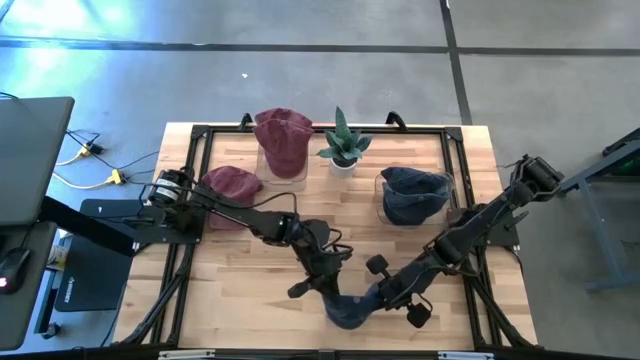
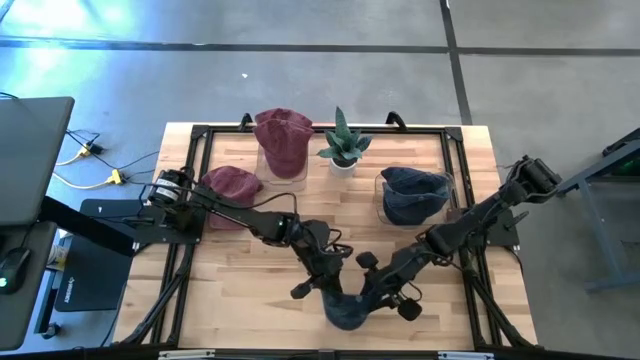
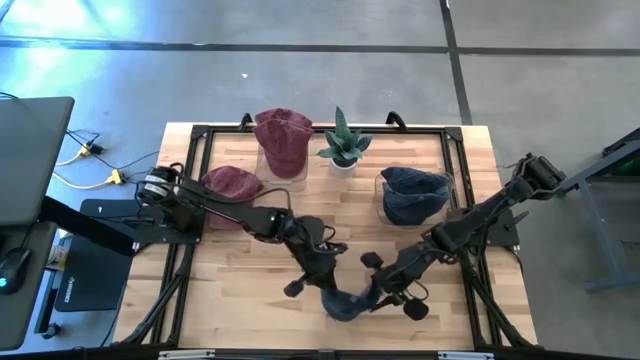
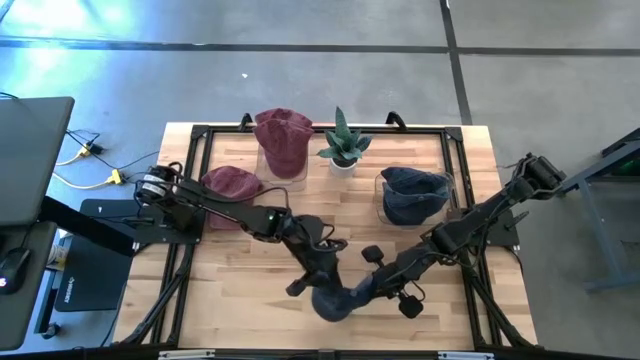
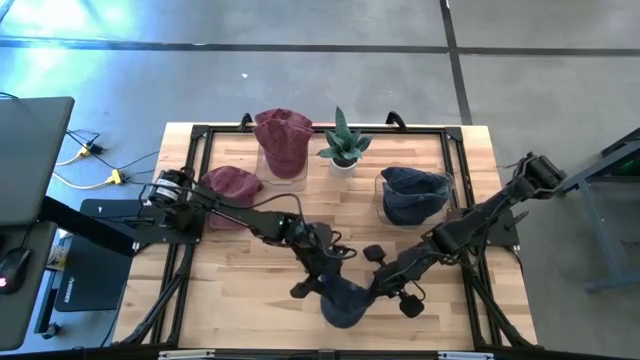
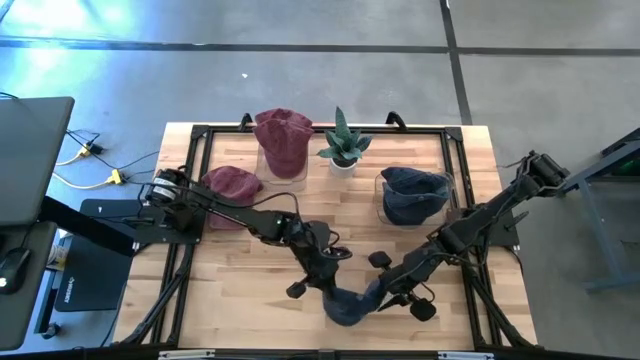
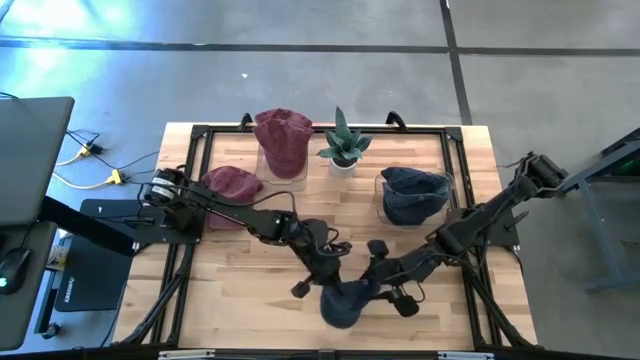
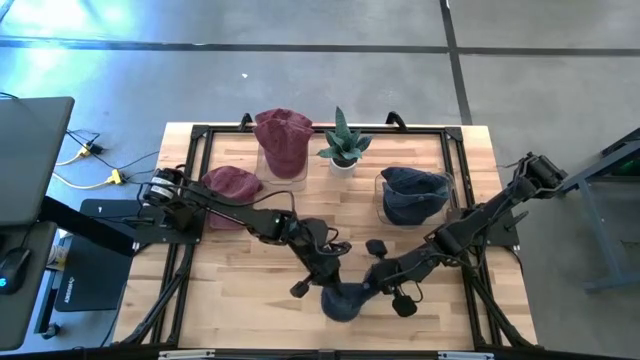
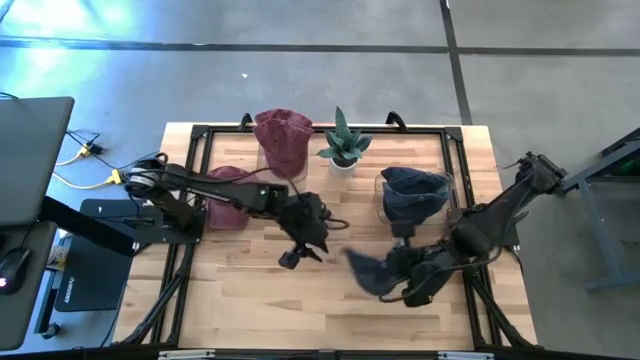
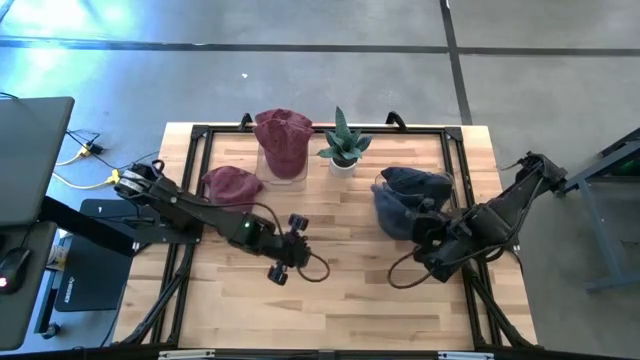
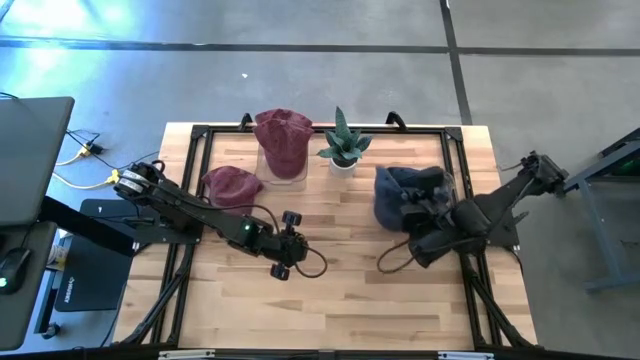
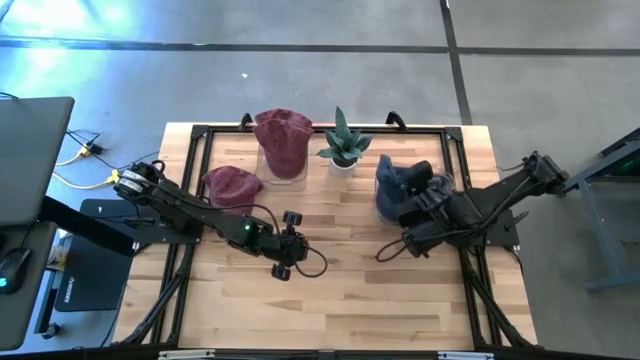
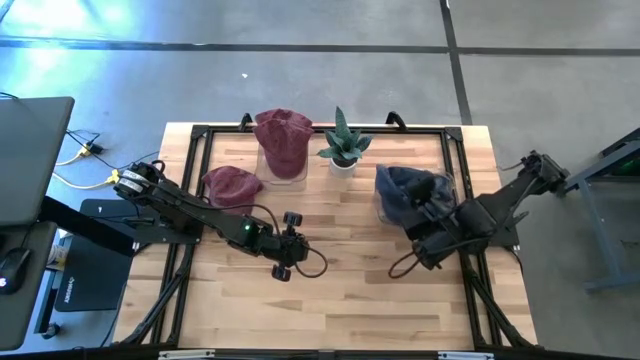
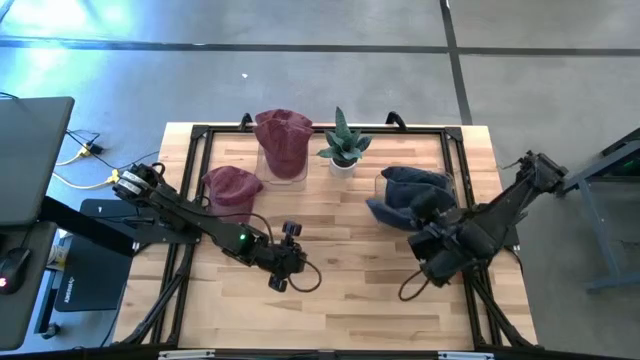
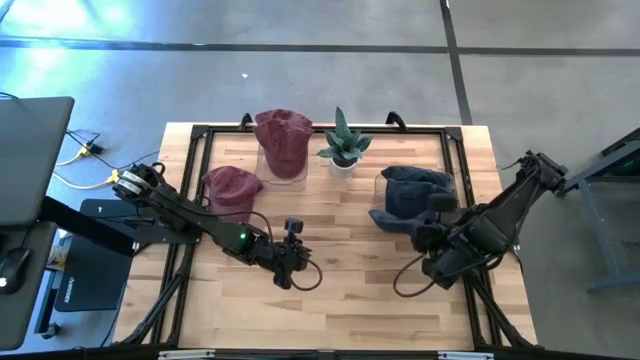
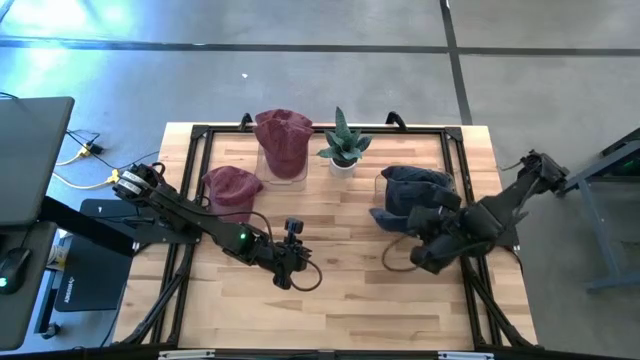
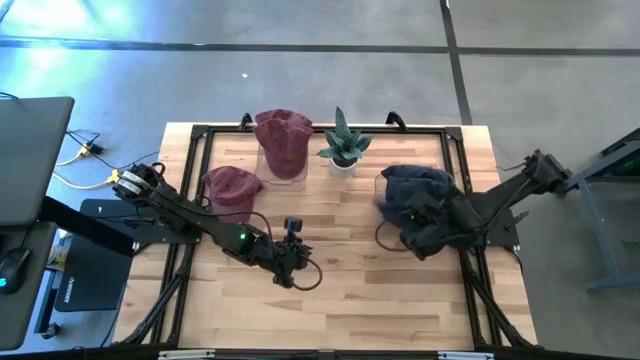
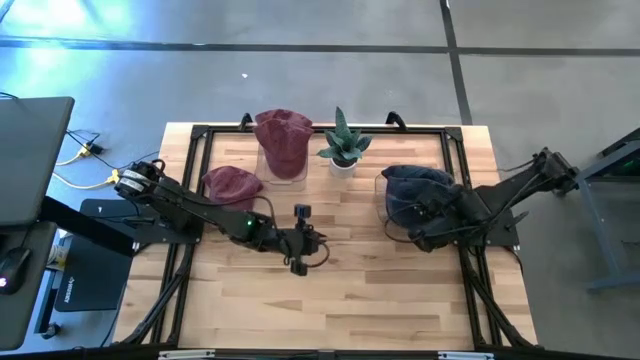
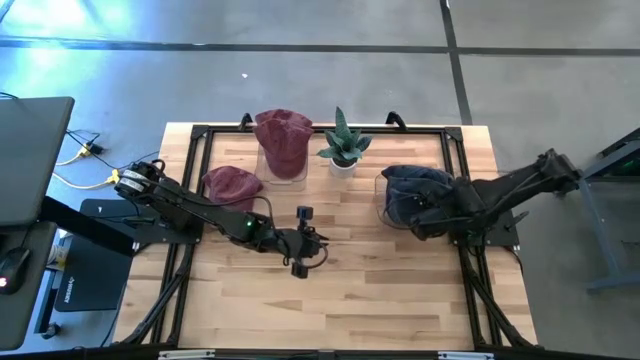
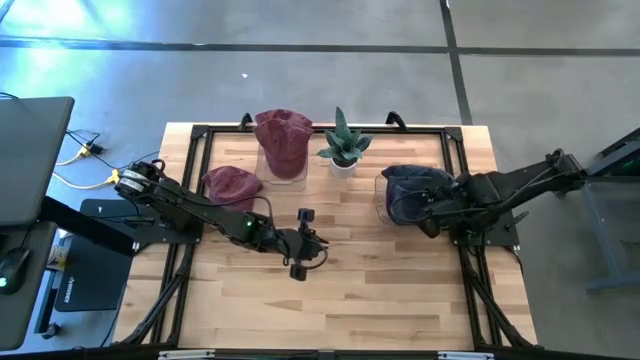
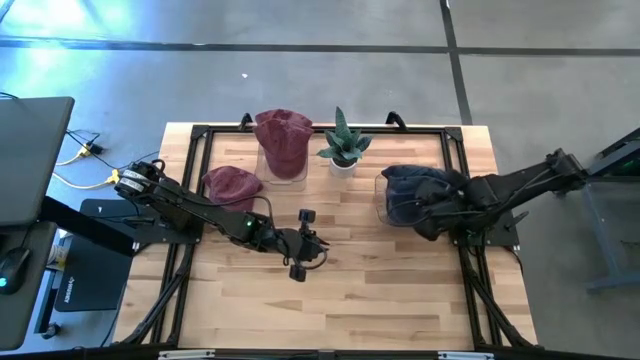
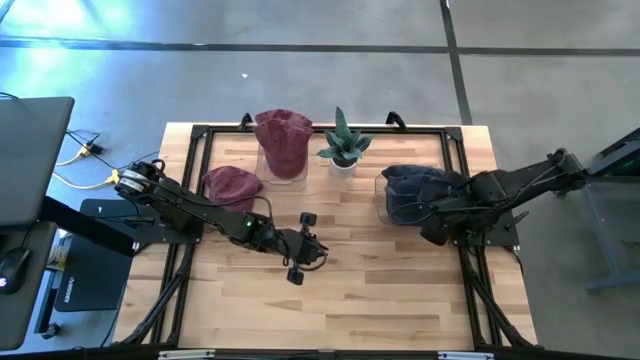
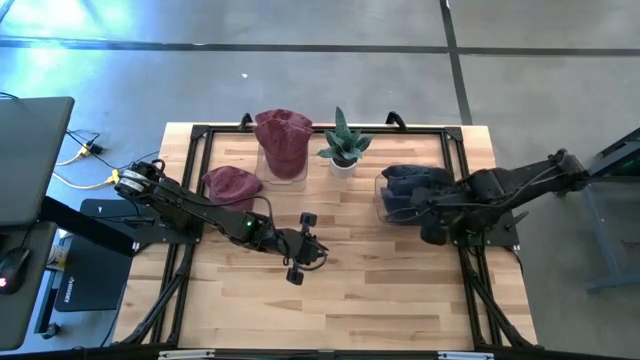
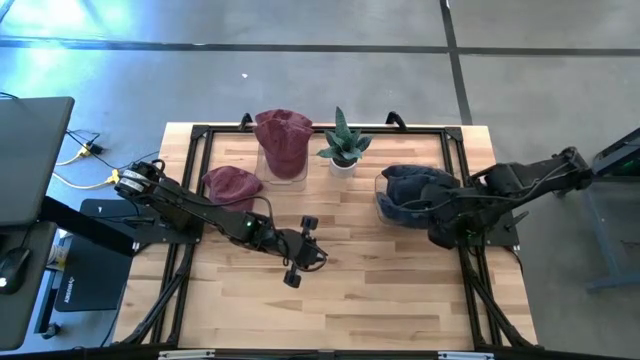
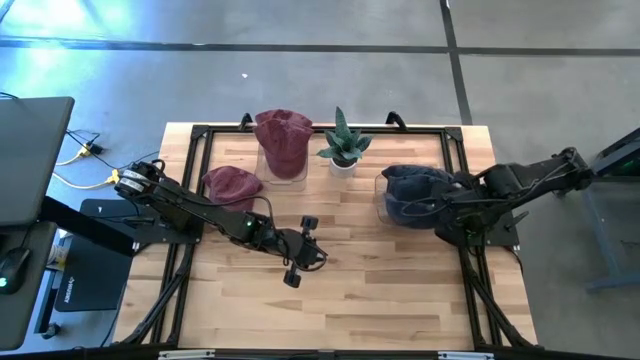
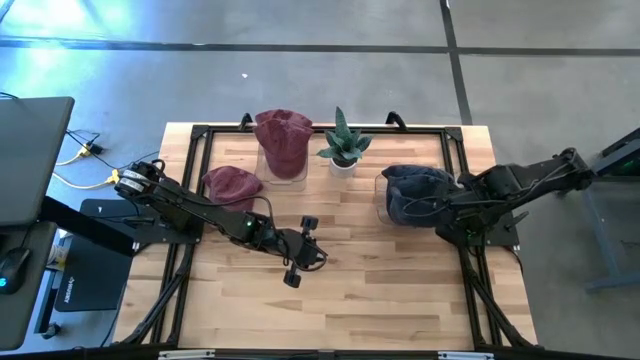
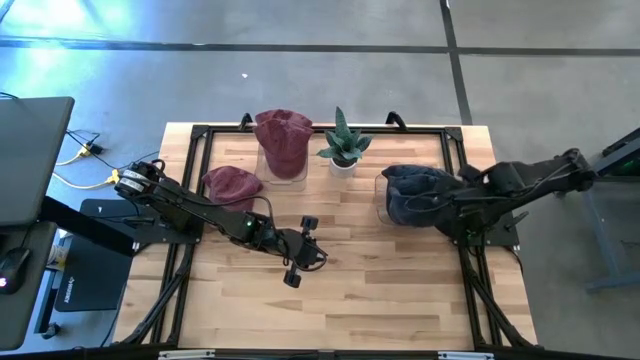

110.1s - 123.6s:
Task: Pick & Place hat
Put the blue cap into the right transparent bin
